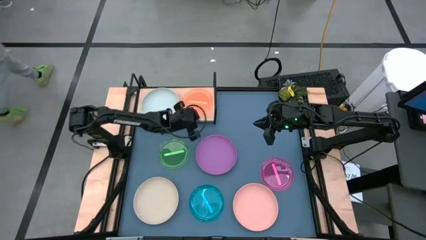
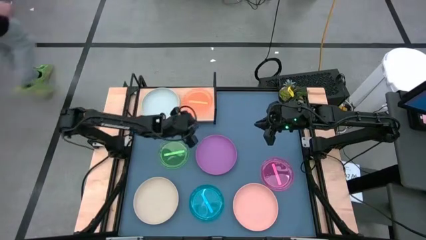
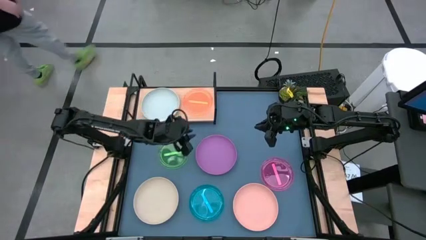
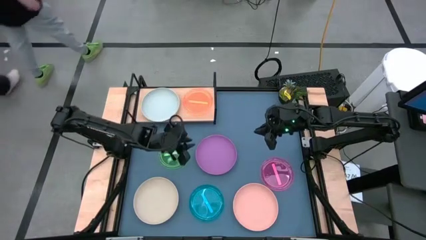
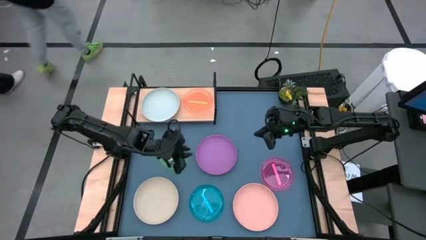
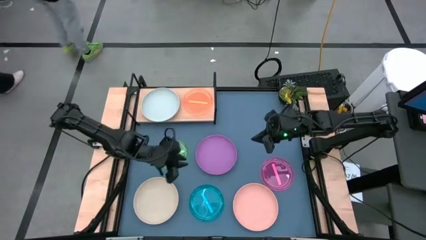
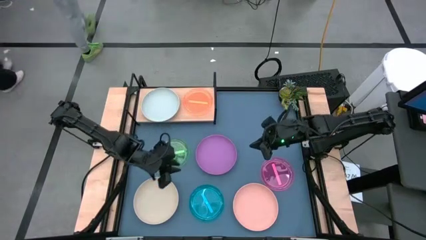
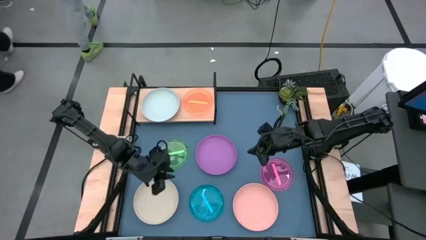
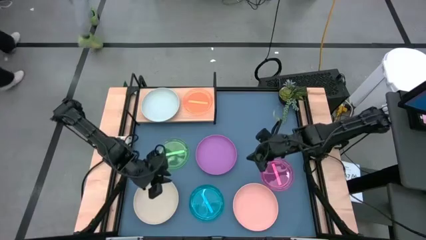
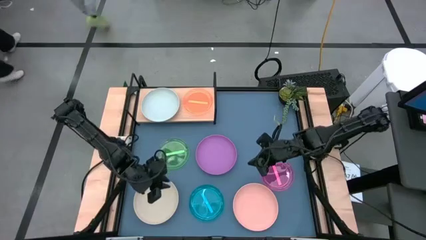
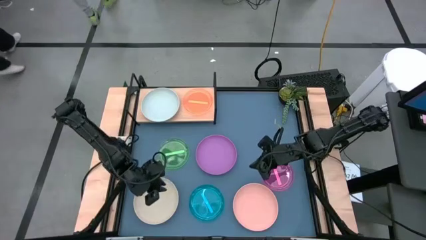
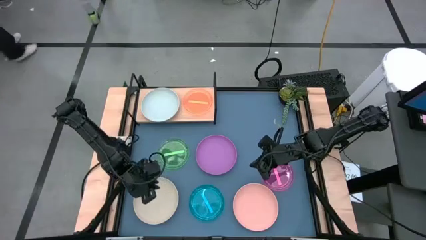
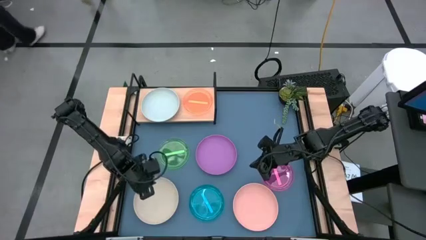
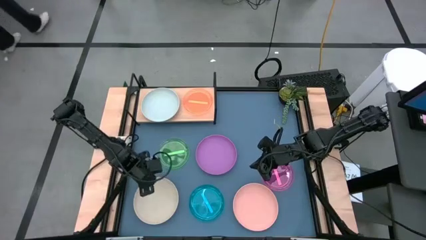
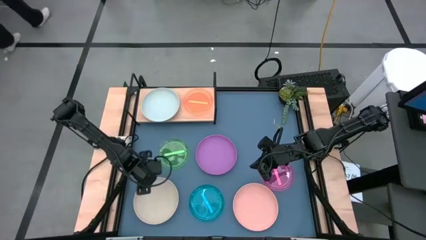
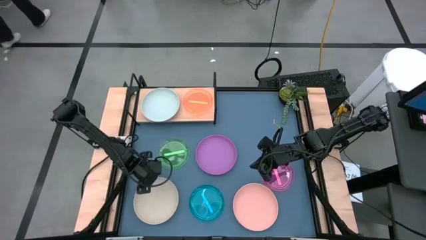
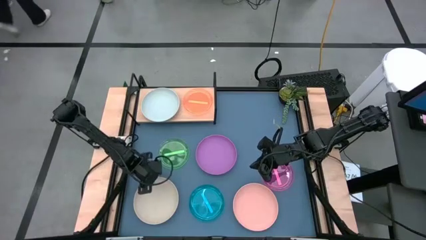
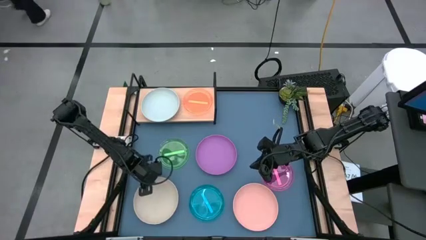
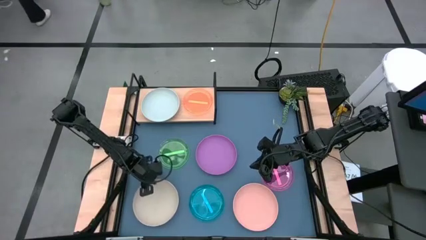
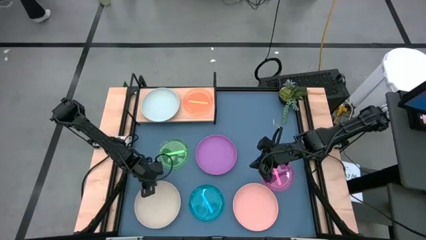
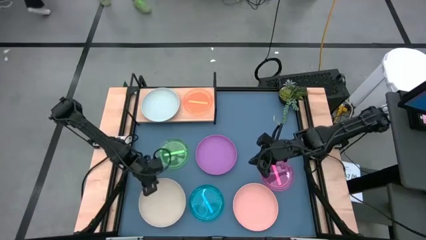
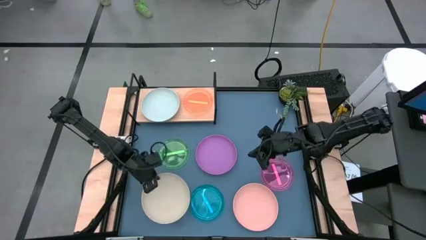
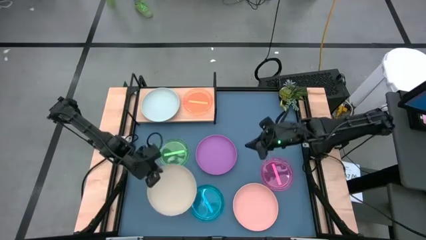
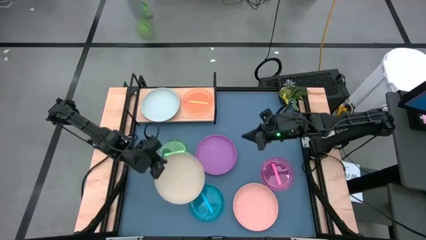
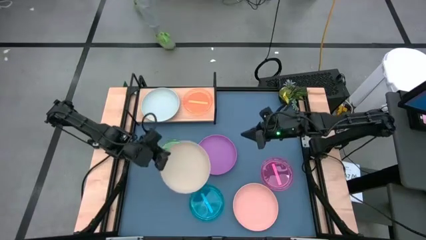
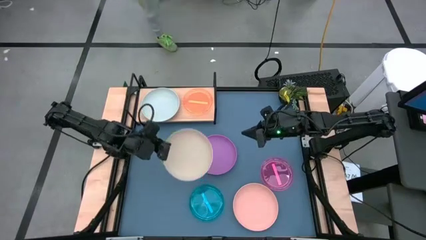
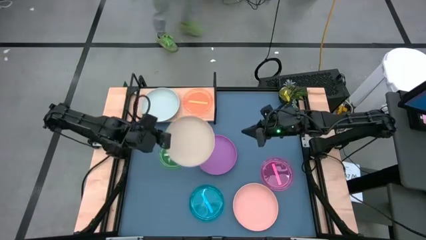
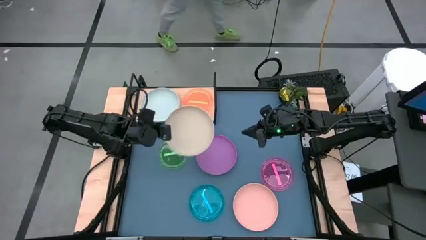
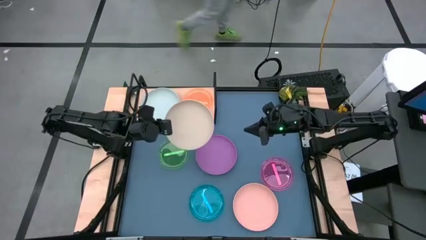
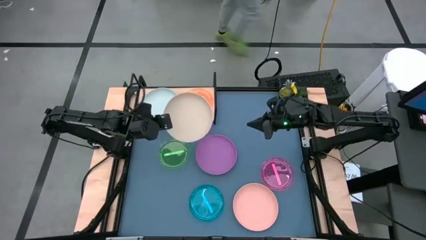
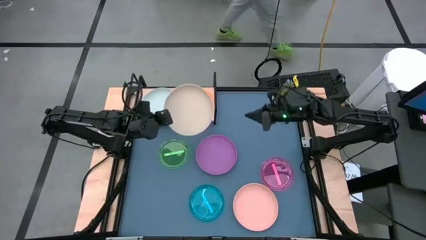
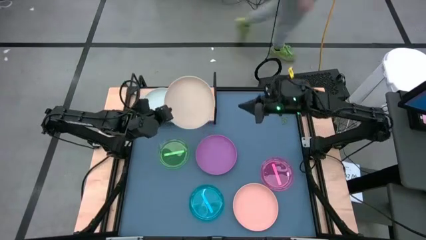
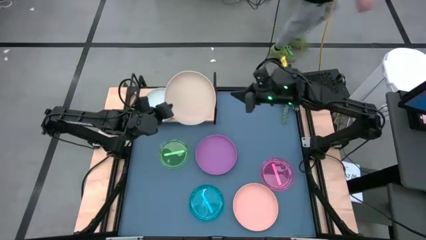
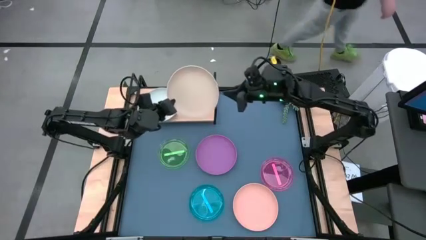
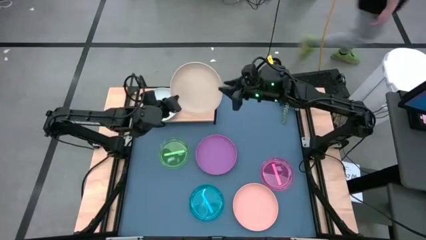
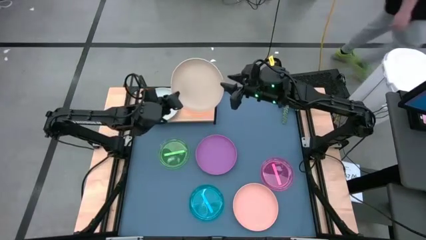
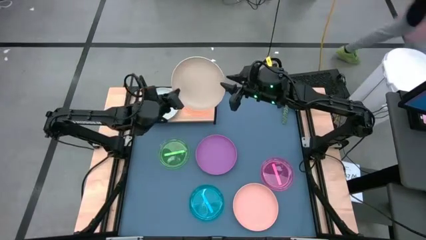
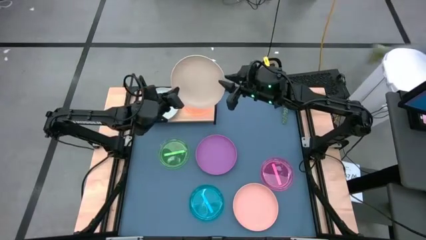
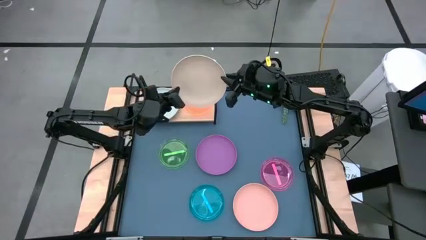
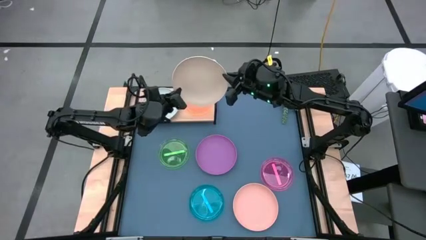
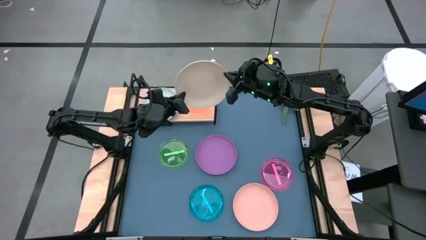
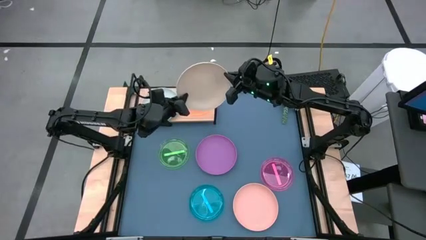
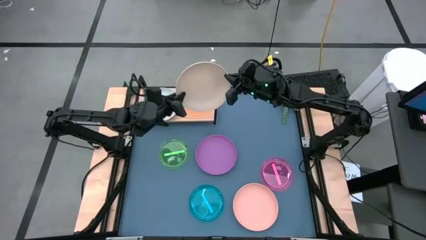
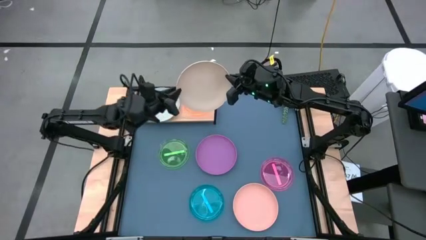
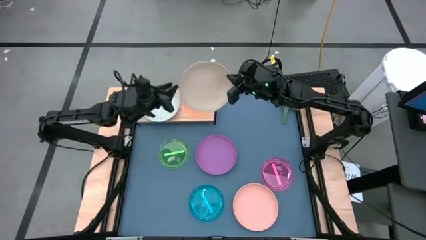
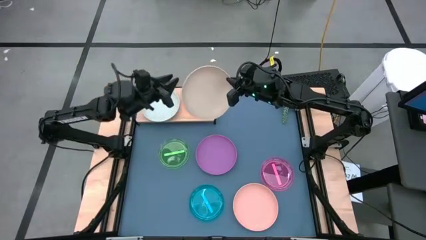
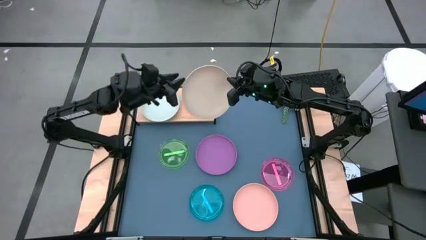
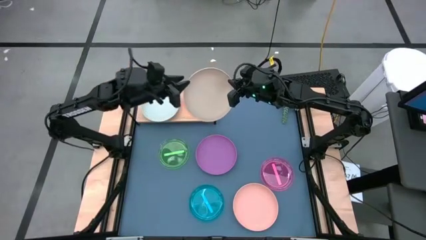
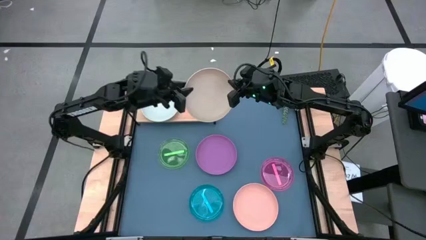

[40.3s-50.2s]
Task: Place and stack plates onto a shelf
Stack the white plate on top of the gray plate on the shelf

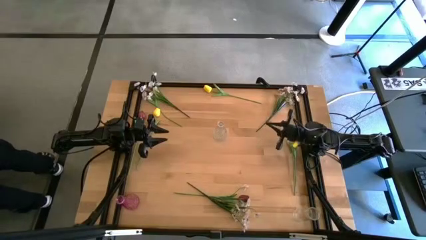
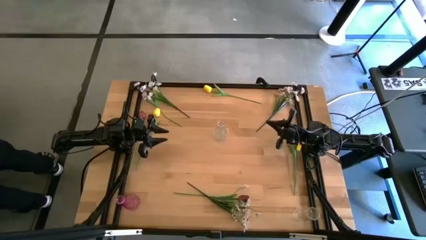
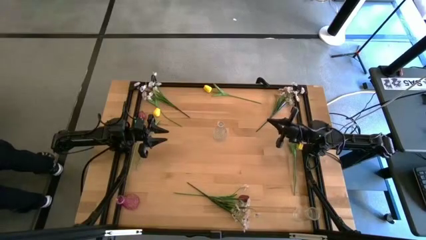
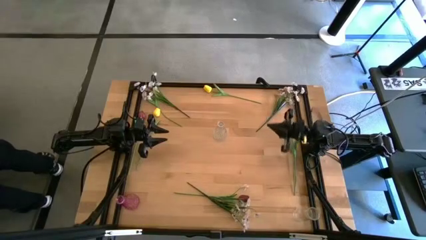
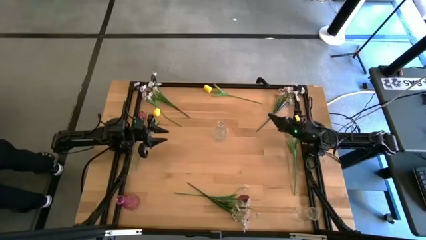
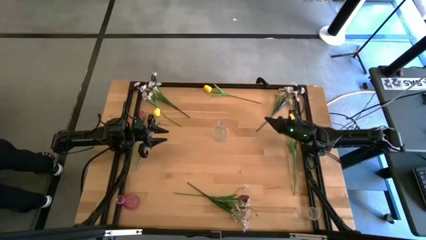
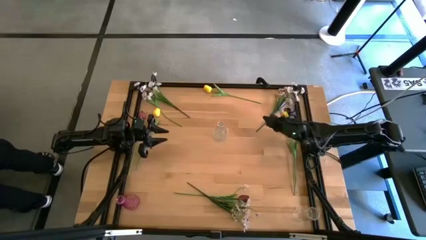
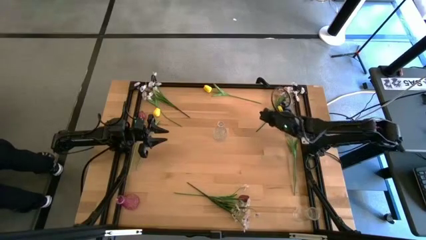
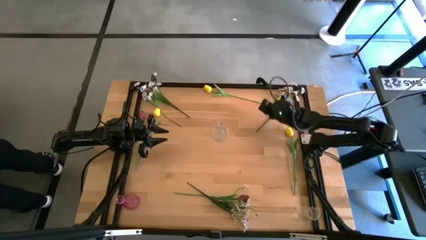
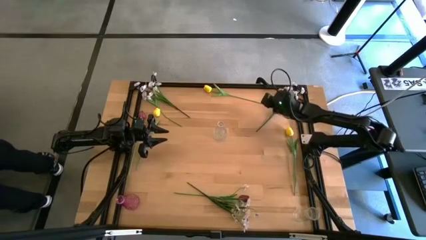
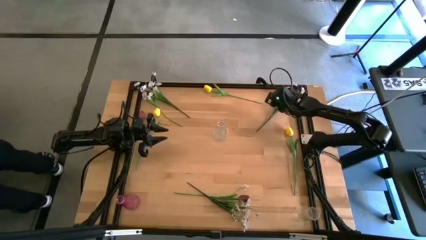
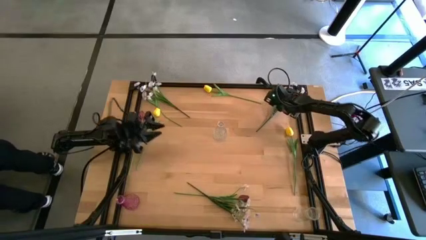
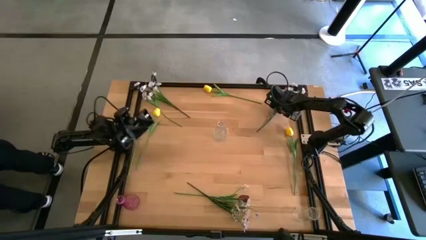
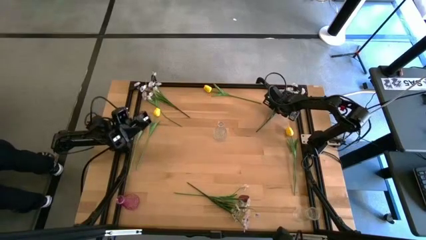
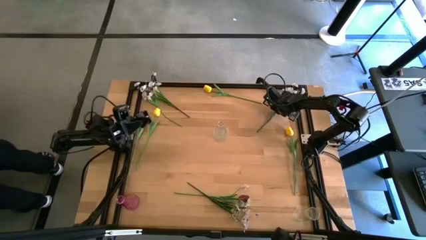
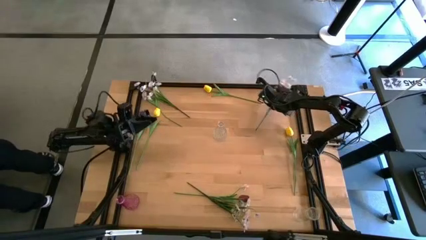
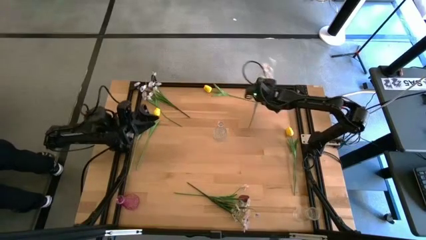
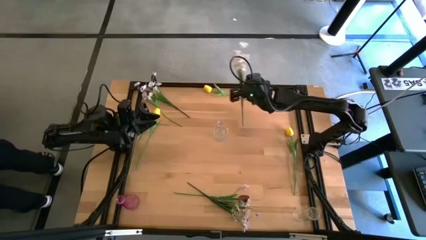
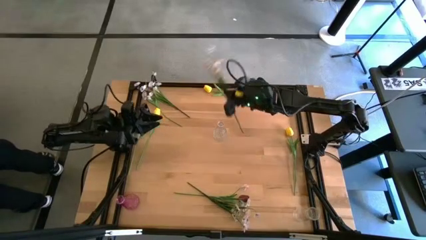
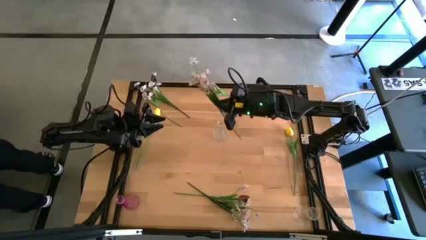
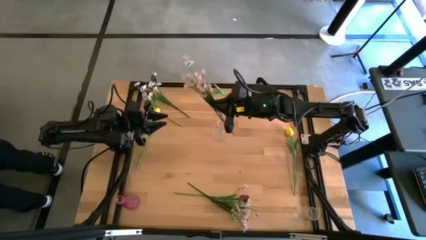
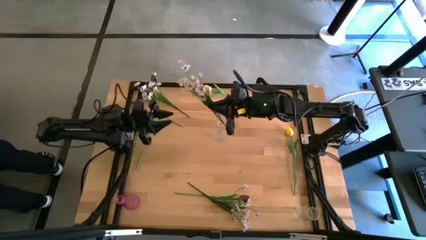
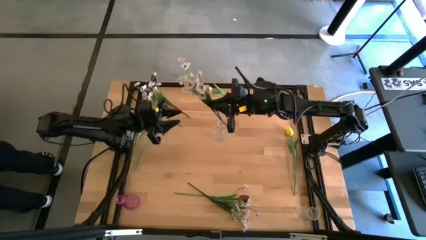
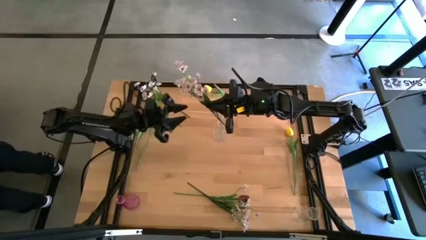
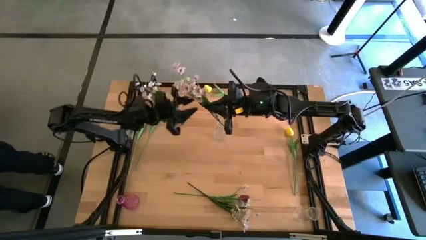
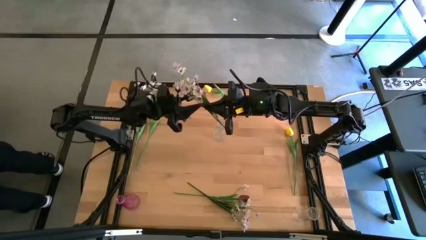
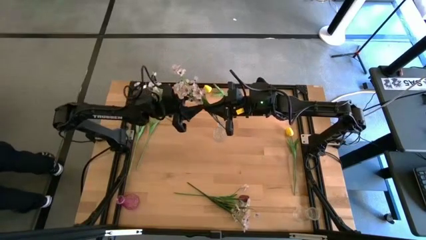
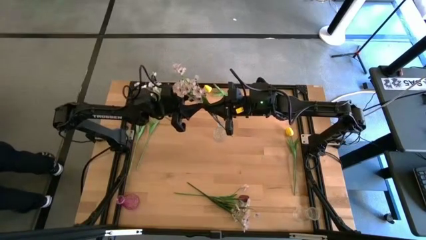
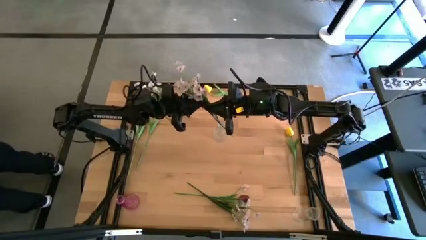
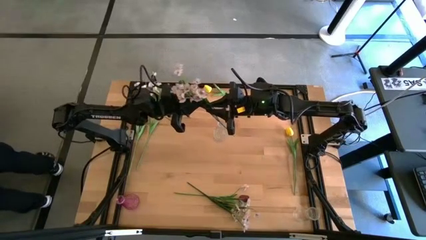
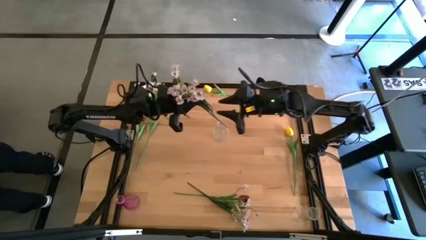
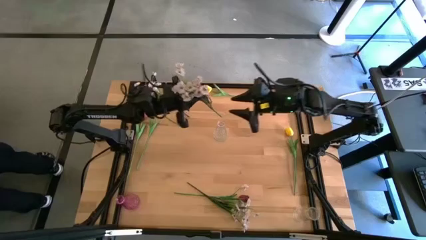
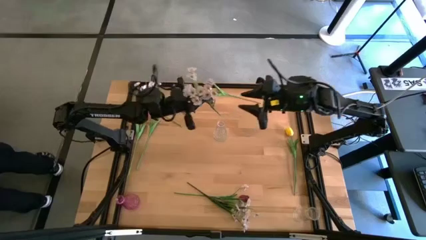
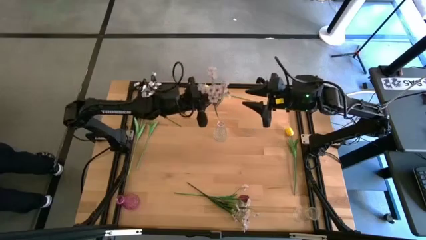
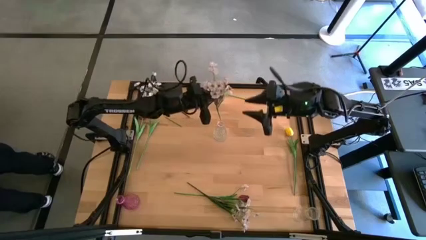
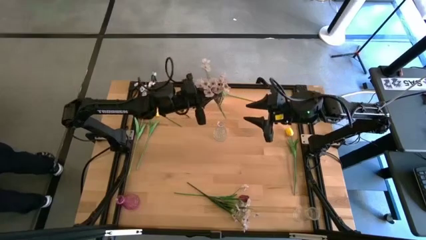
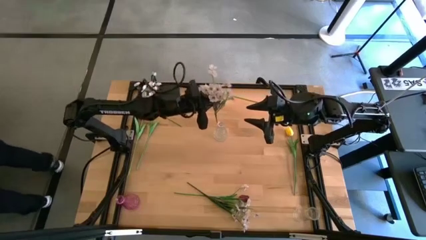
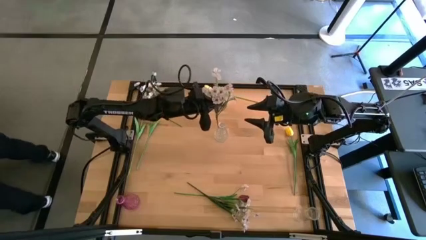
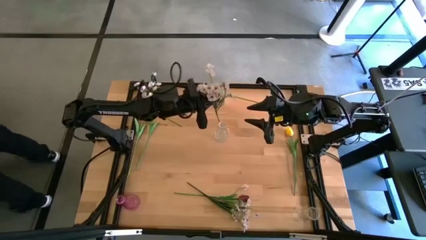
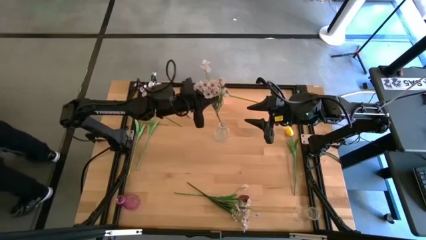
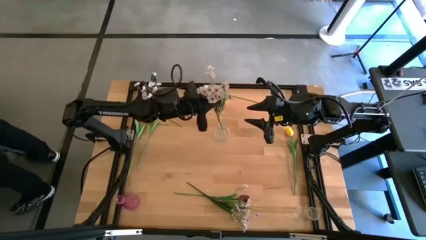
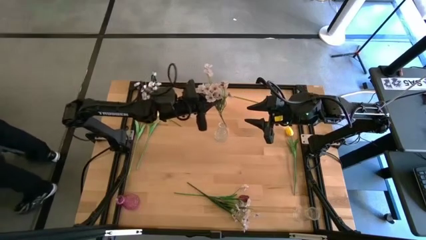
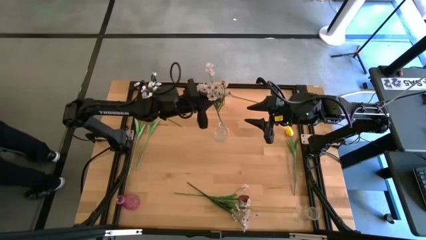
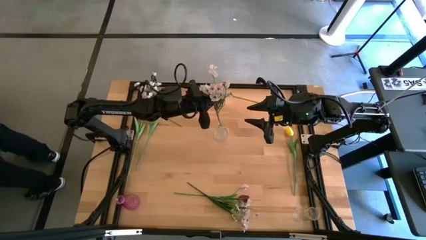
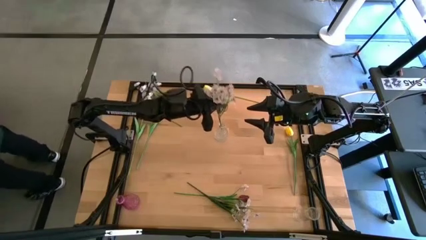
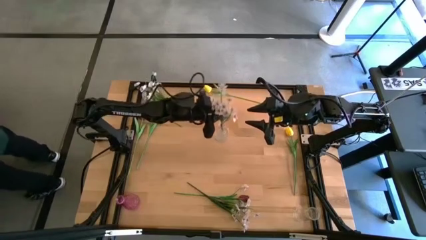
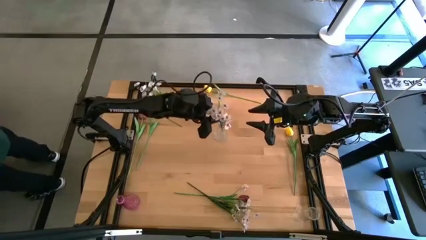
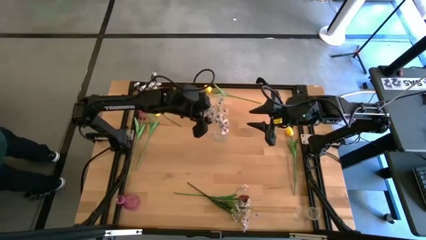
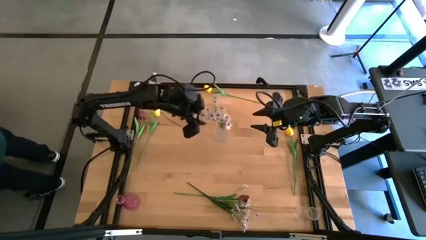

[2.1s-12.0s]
Task: Sort flowers into vase by color
Put the right white flowers into the top transparent vase
